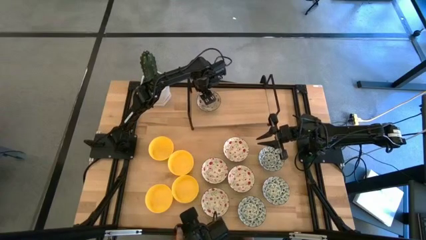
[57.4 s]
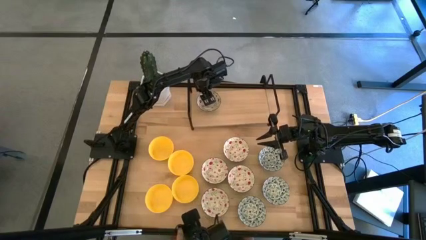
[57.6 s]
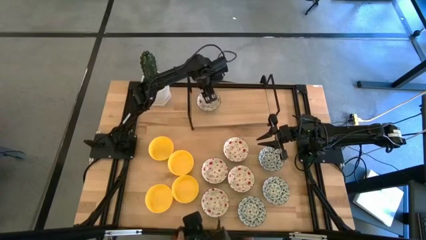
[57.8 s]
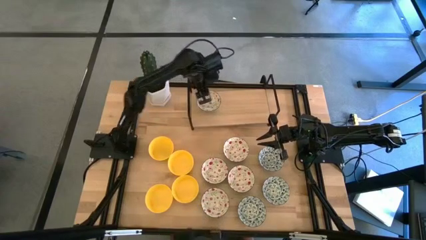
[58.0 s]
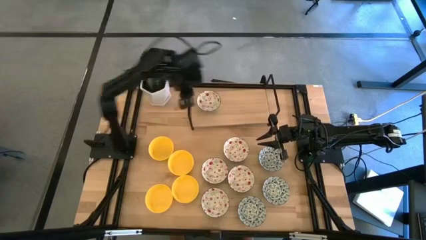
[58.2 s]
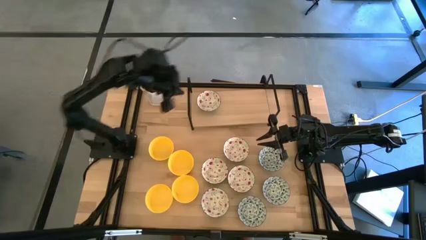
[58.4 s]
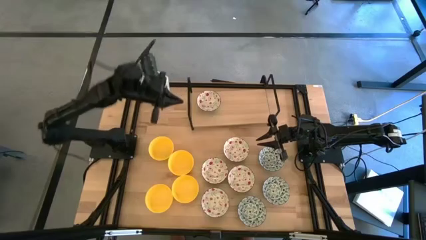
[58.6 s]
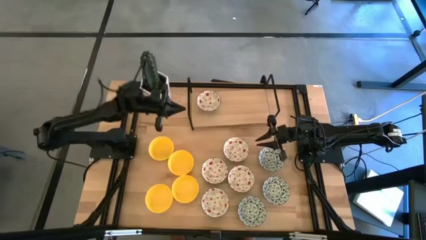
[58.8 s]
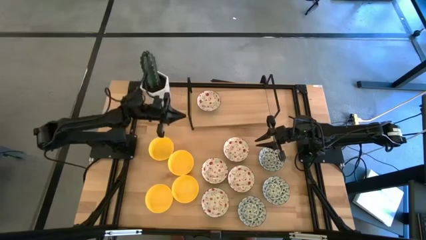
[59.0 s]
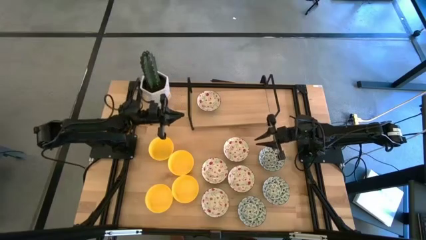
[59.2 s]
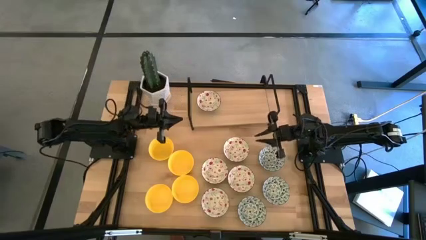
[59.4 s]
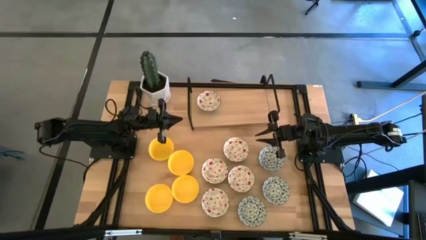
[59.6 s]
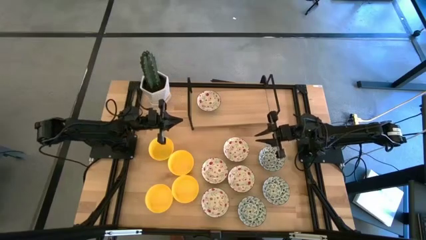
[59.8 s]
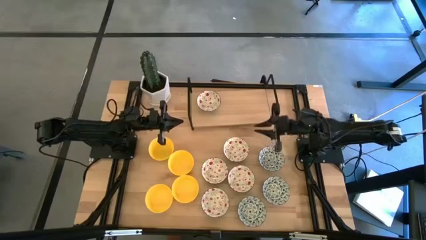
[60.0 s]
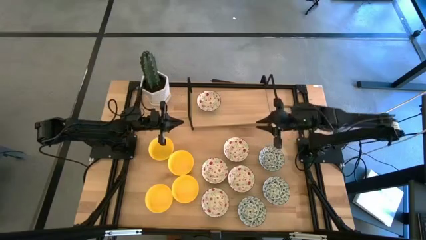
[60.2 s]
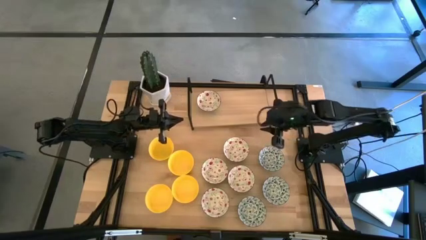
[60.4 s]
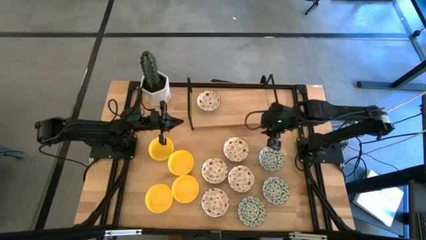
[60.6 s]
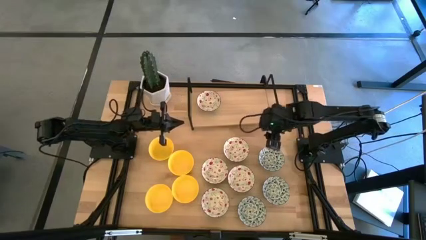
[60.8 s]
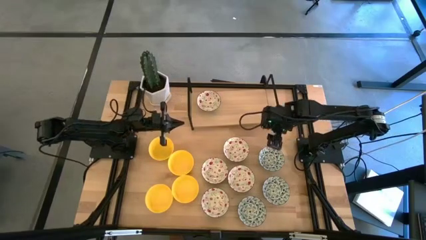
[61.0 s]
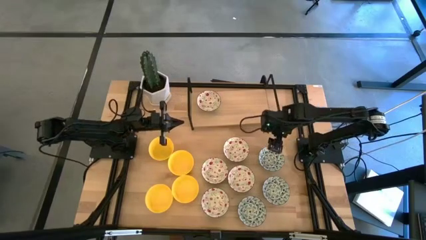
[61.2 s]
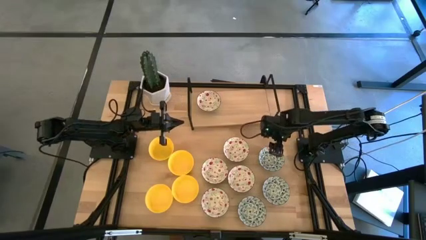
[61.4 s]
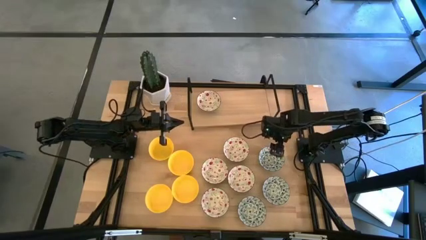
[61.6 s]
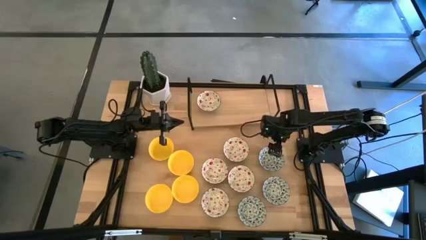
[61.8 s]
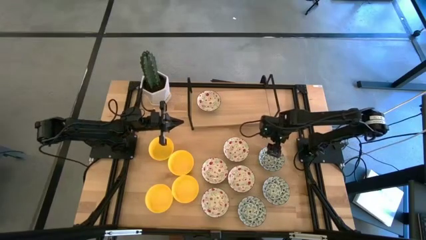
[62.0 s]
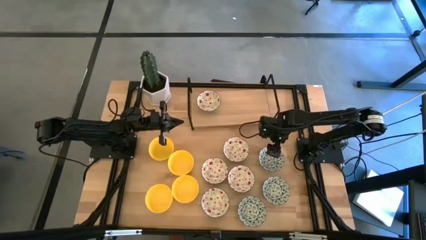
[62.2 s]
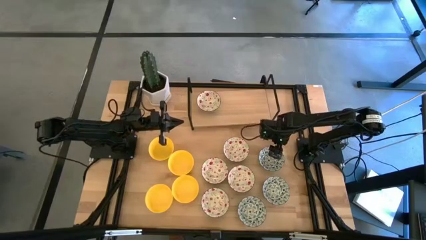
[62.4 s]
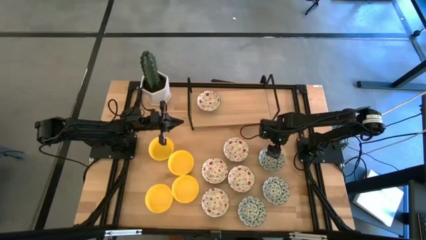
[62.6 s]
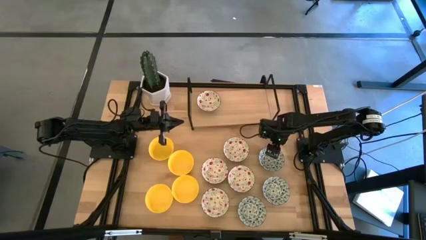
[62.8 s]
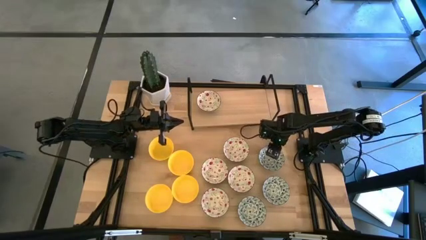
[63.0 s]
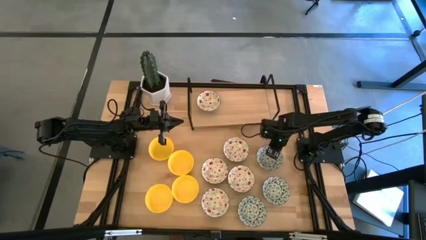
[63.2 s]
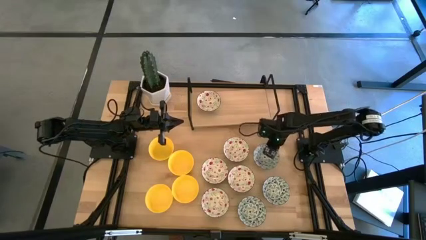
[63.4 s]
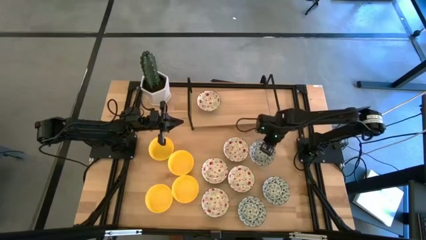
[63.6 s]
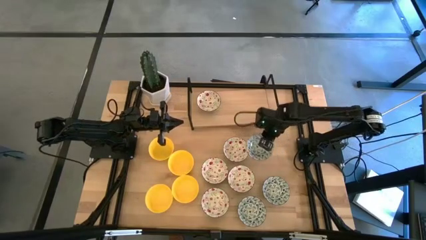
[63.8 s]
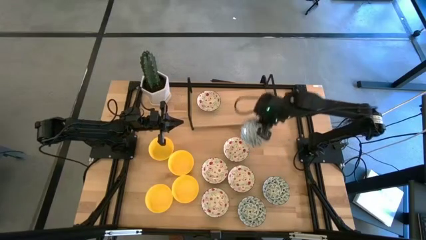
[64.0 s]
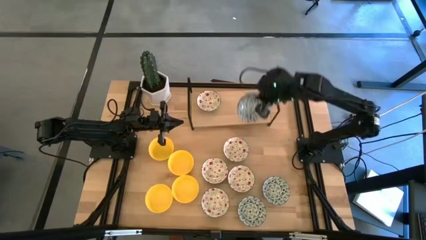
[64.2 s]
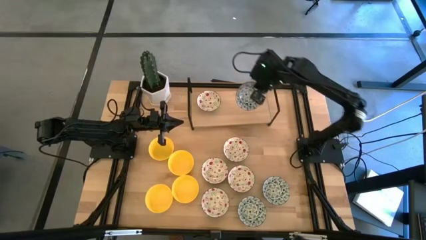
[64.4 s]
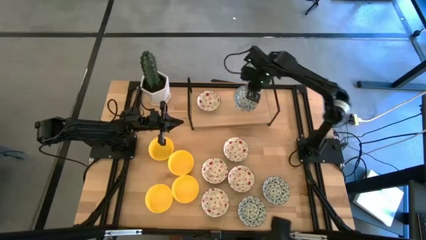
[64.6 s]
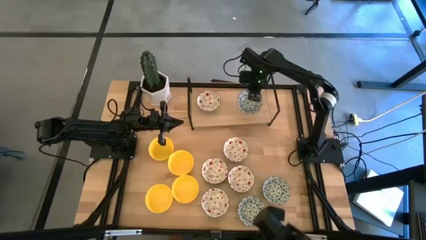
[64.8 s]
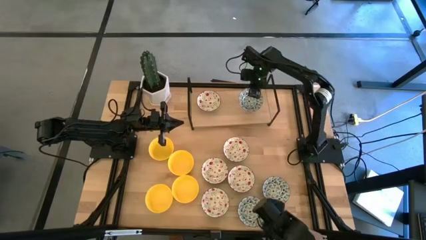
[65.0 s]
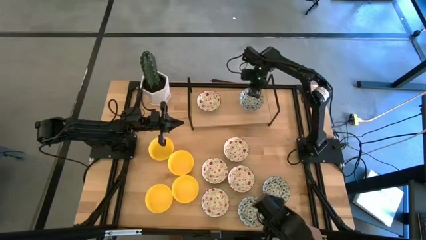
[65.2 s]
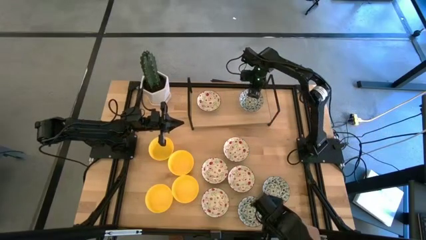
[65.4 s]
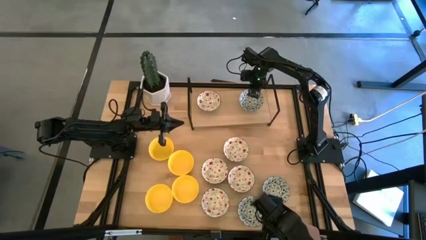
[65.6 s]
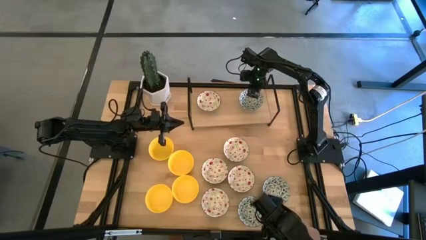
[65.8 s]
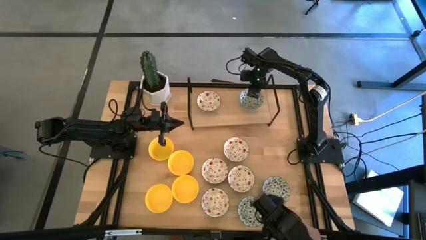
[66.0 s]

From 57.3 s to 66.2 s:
Task: Pick & Place Mini bowls
Put the blue patterned bowl on the shelf

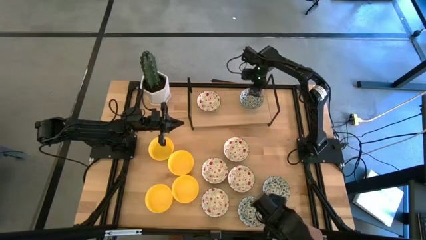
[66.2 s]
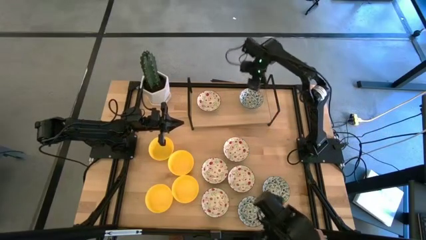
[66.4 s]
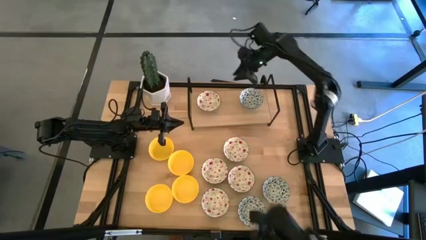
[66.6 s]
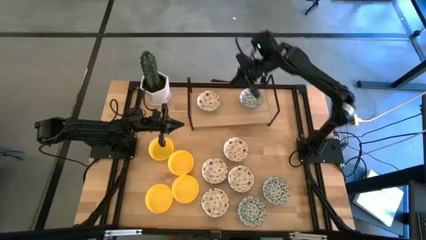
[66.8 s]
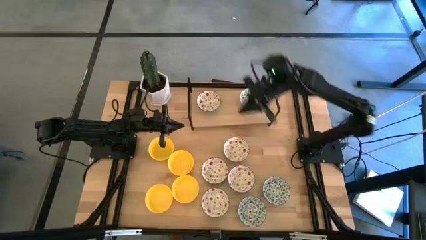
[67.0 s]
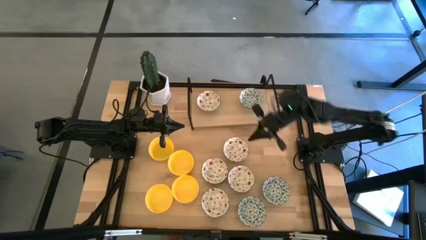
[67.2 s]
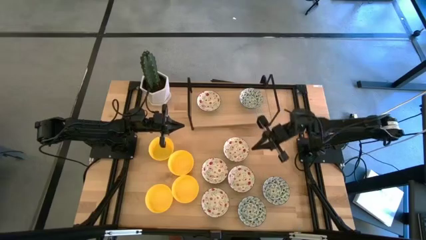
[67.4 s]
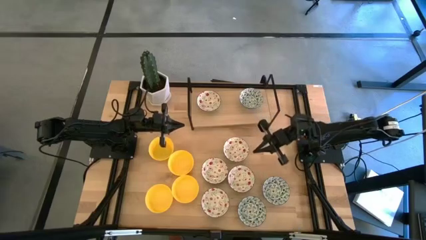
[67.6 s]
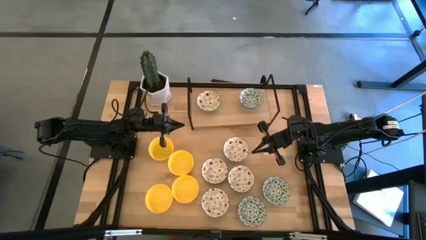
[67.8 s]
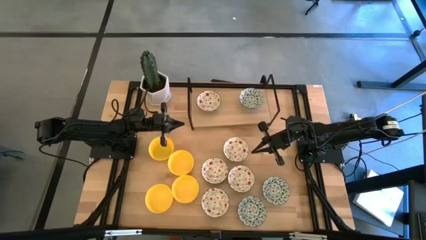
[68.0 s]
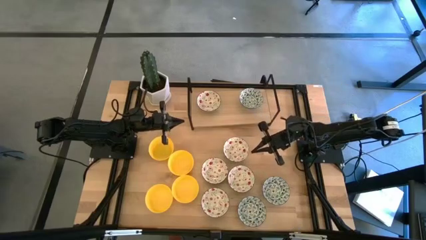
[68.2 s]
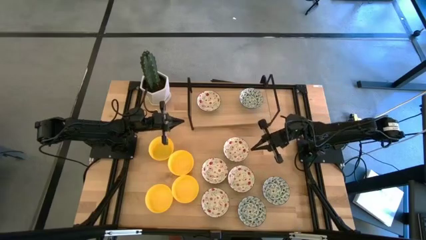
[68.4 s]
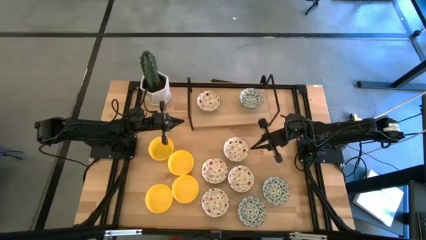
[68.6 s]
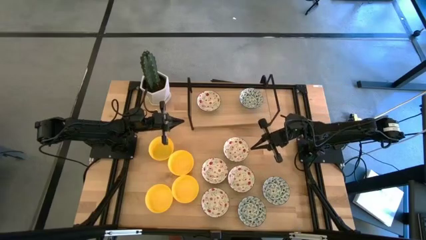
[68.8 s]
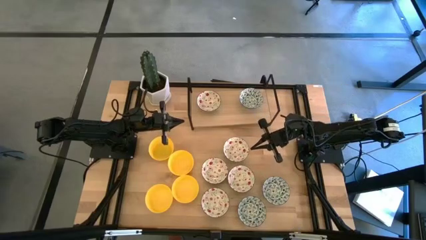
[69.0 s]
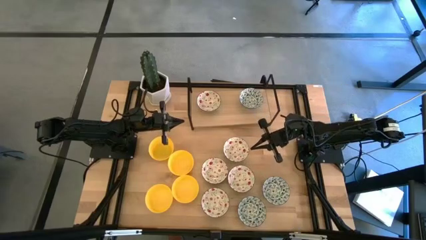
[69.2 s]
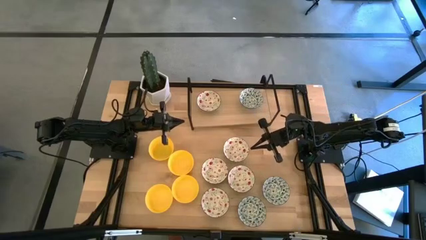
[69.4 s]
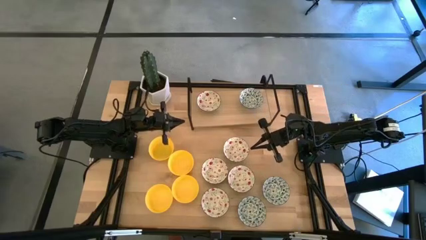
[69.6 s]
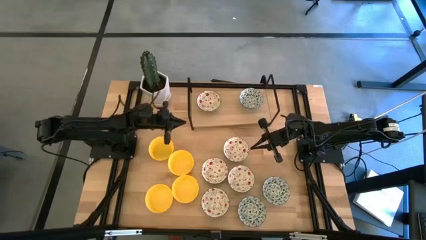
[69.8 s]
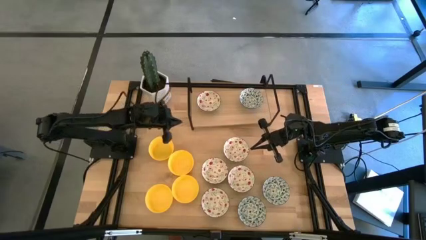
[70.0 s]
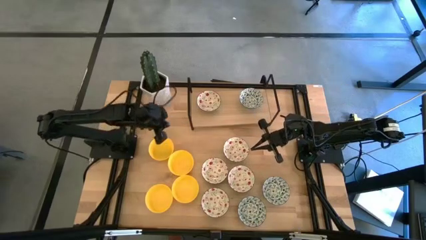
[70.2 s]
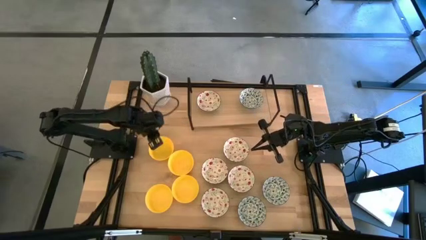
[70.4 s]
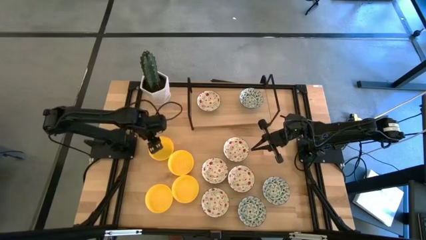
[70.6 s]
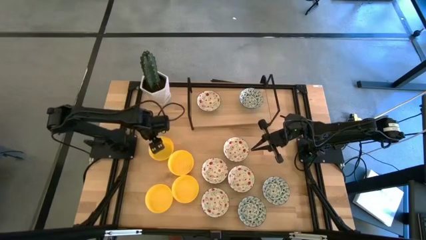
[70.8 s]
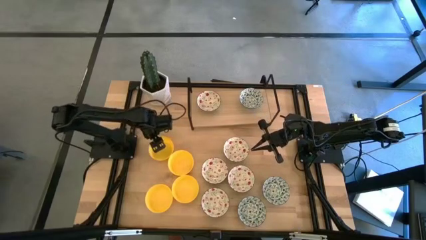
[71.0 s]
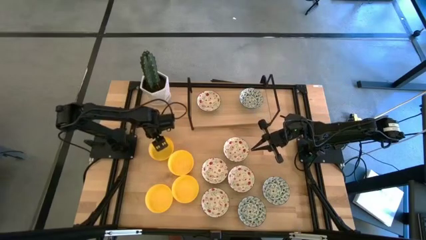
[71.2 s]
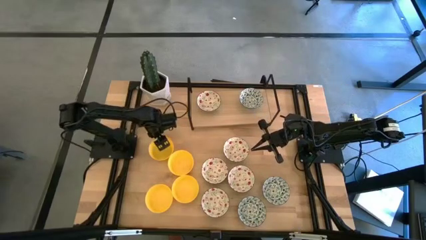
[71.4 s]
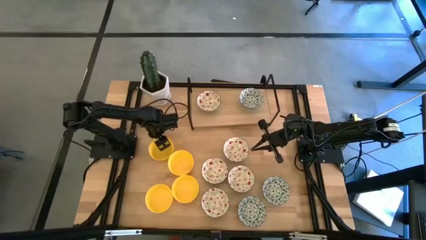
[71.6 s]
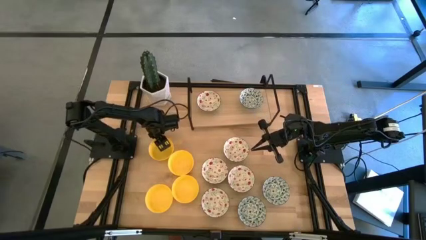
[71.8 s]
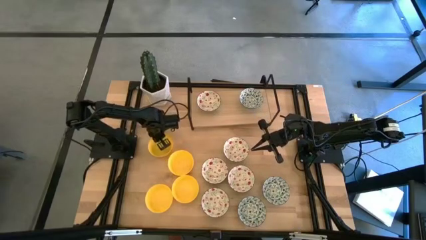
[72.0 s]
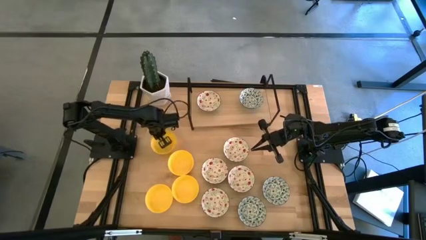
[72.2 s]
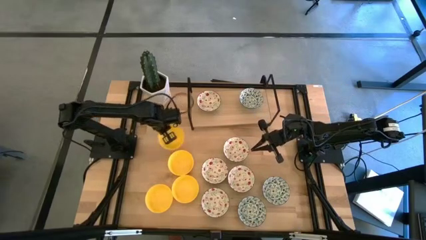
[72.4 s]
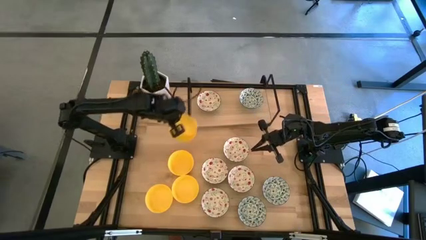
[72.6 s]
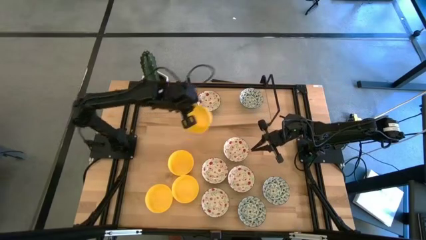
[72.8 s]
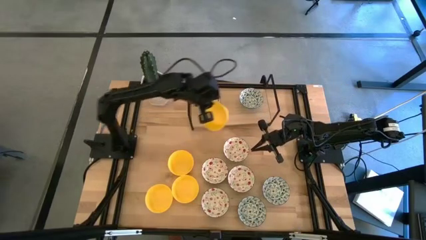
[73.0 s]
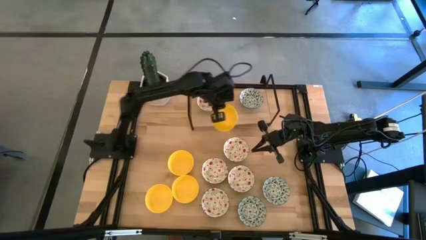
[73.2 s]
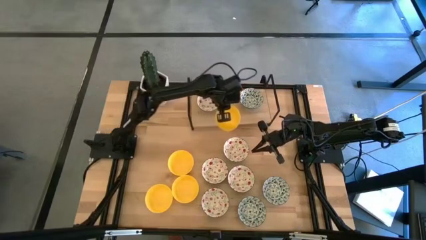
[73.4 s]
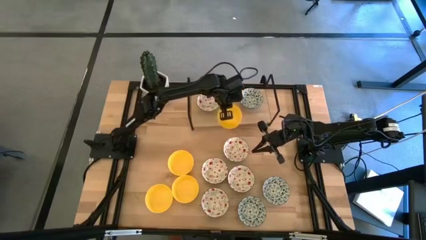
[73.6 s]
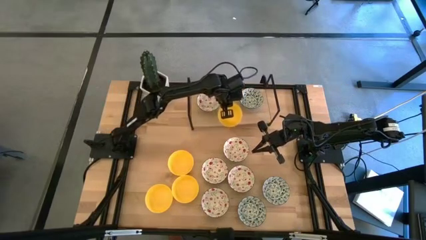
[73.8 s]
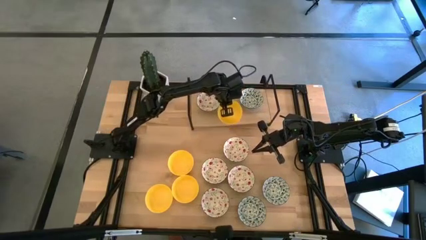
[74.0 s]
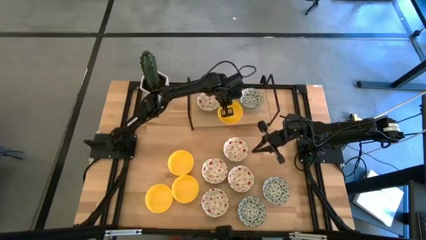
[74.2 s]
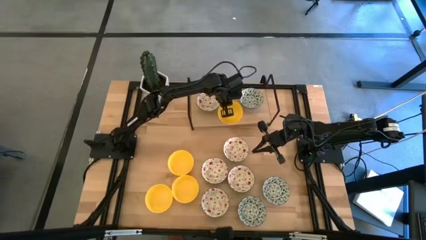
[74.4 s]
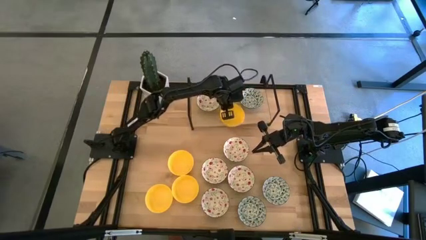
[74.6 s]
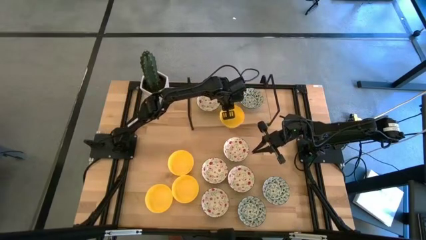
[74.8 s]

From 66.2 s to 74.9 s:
Put the yellow bowl on the shelf
